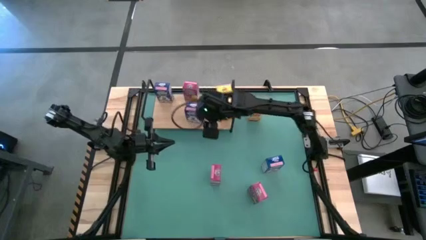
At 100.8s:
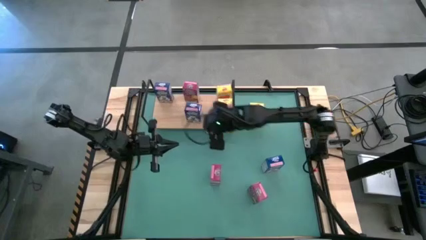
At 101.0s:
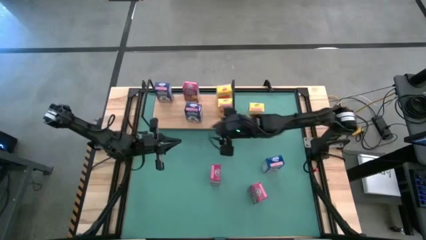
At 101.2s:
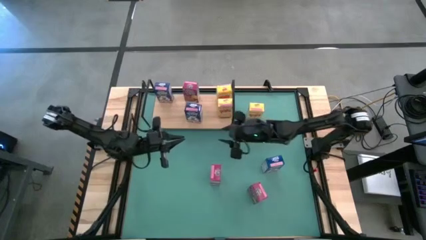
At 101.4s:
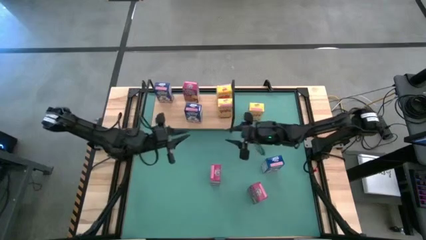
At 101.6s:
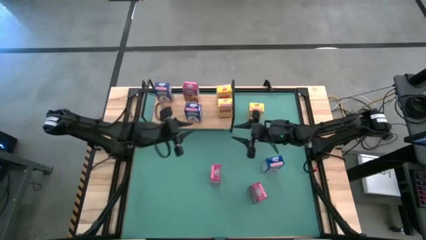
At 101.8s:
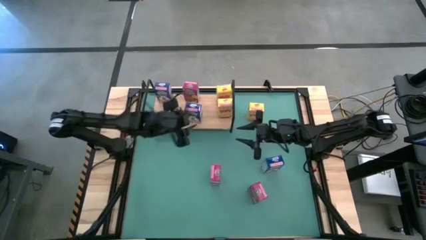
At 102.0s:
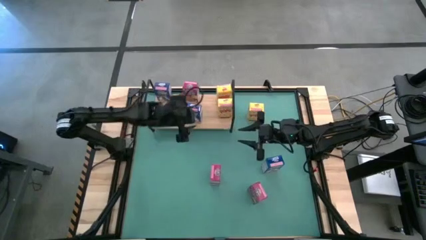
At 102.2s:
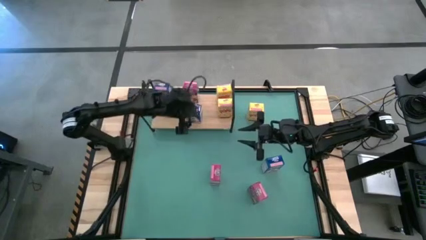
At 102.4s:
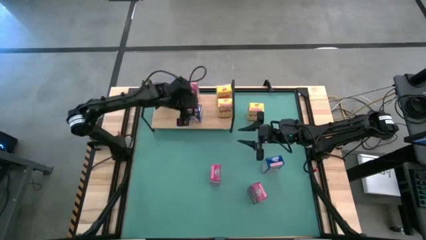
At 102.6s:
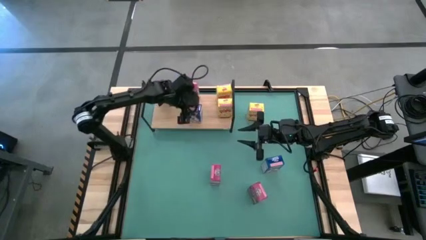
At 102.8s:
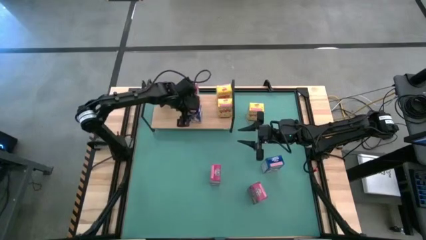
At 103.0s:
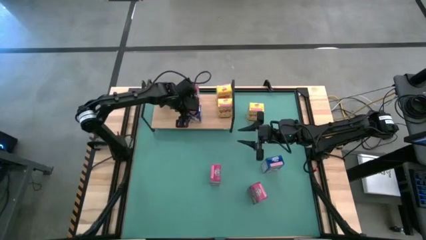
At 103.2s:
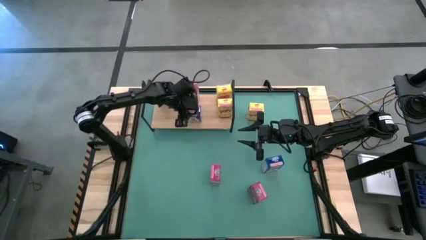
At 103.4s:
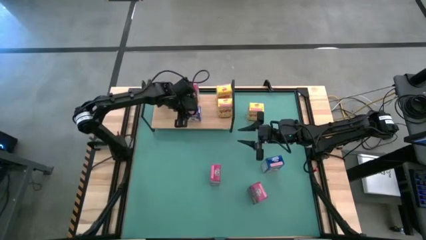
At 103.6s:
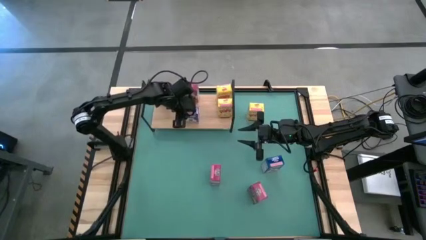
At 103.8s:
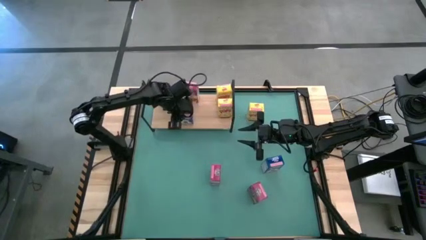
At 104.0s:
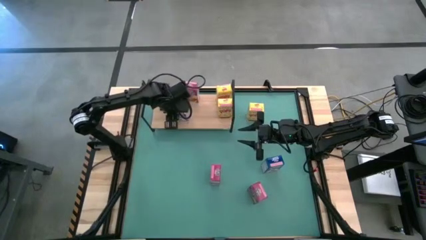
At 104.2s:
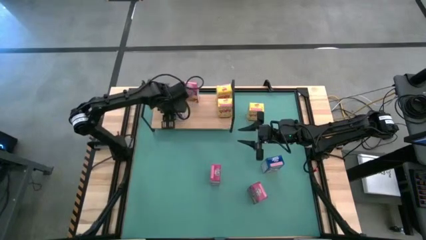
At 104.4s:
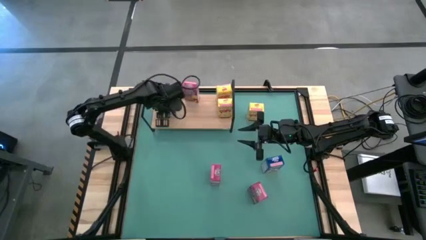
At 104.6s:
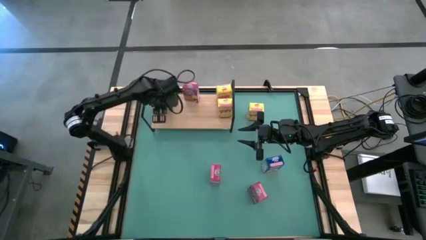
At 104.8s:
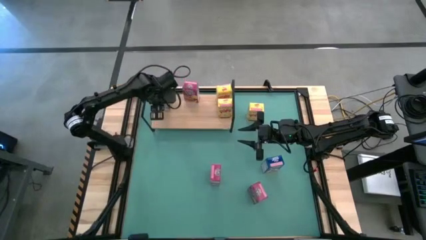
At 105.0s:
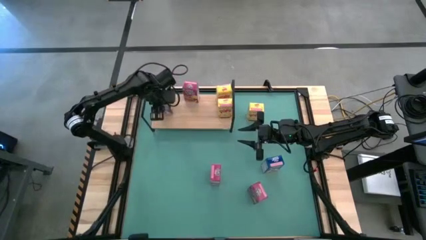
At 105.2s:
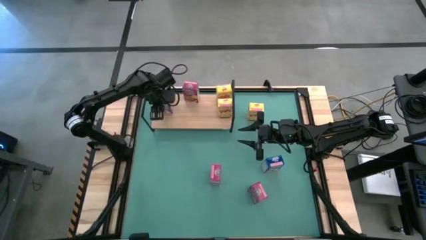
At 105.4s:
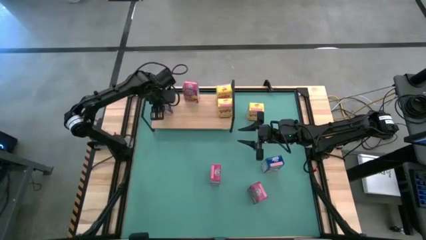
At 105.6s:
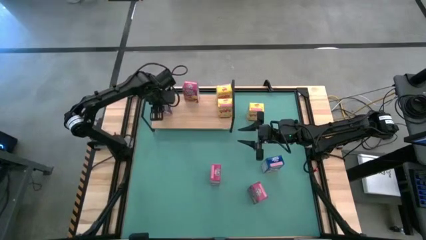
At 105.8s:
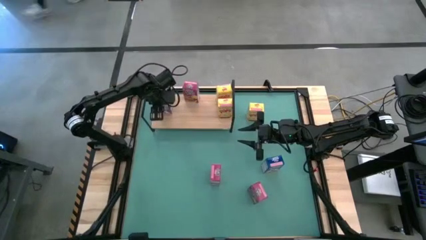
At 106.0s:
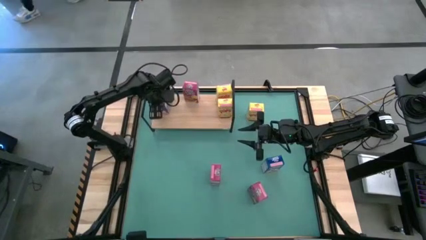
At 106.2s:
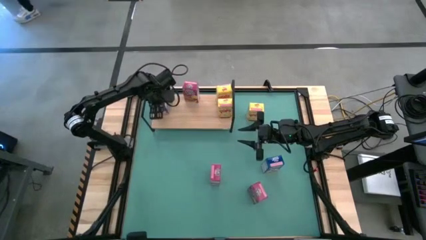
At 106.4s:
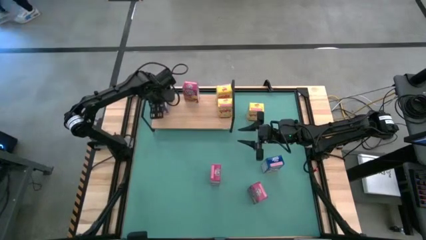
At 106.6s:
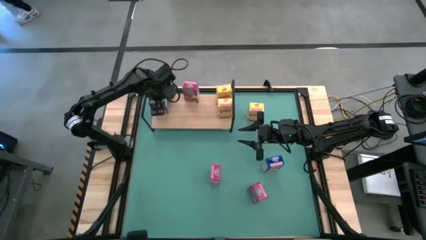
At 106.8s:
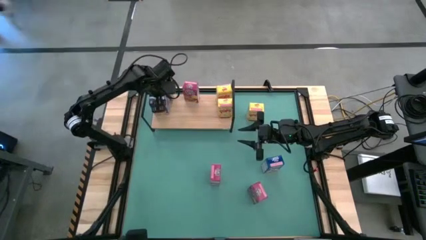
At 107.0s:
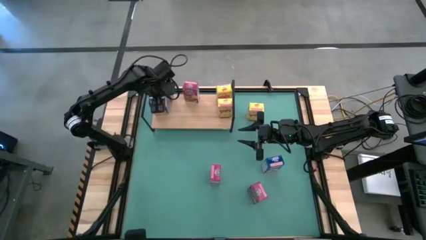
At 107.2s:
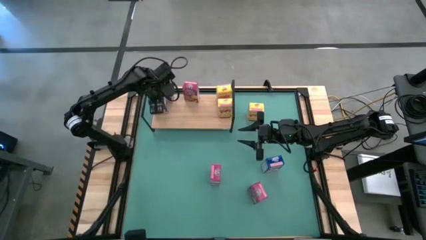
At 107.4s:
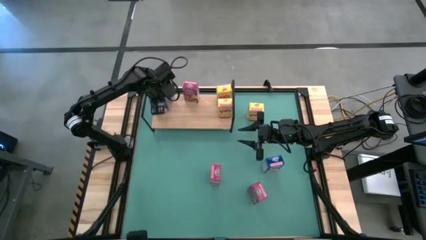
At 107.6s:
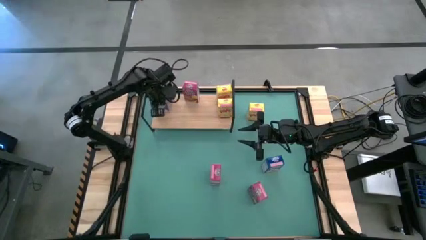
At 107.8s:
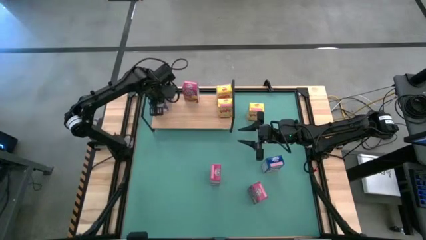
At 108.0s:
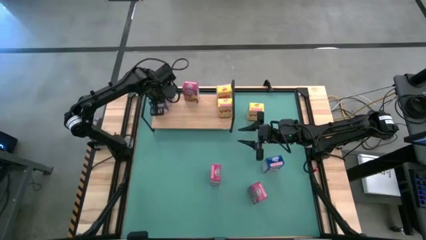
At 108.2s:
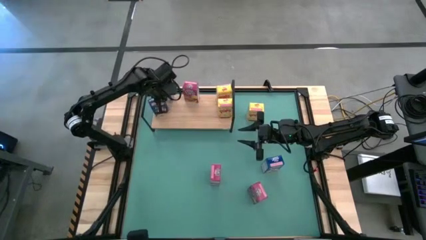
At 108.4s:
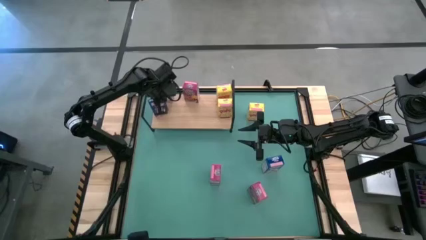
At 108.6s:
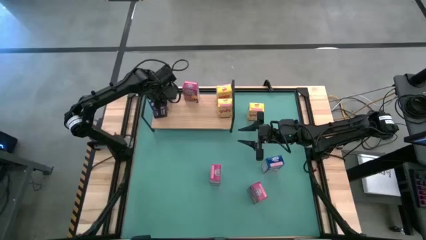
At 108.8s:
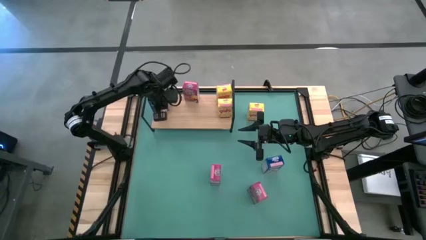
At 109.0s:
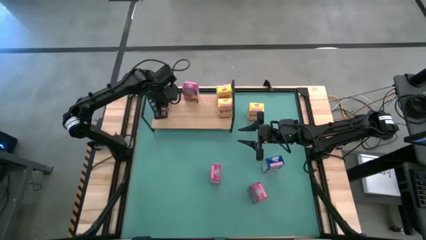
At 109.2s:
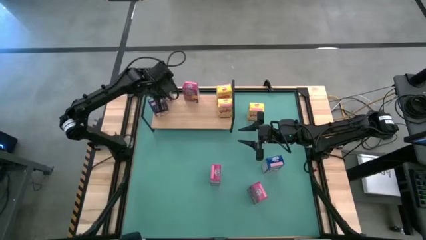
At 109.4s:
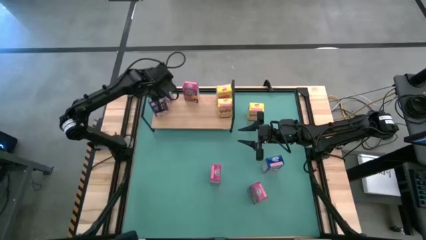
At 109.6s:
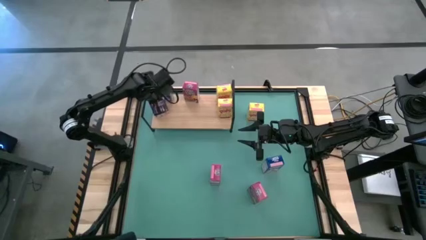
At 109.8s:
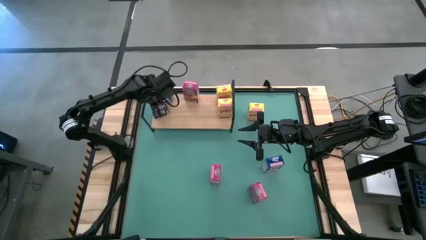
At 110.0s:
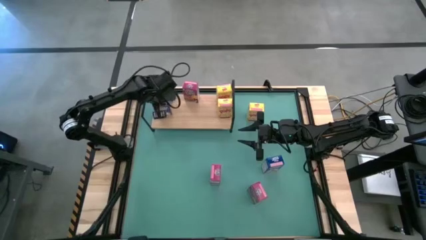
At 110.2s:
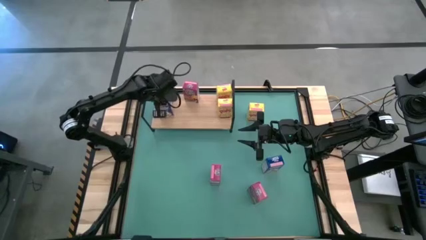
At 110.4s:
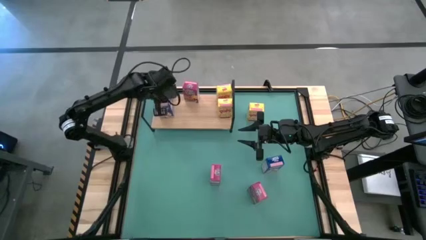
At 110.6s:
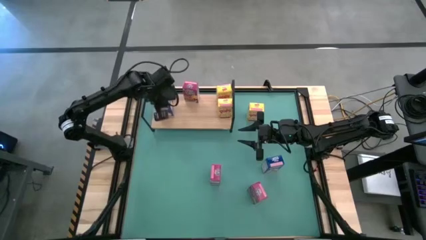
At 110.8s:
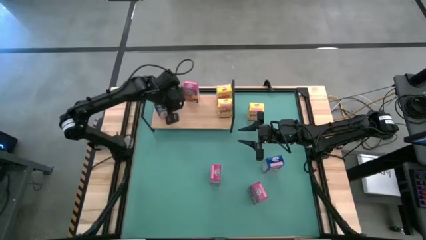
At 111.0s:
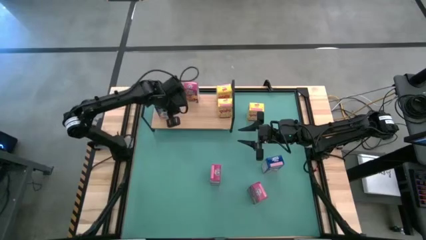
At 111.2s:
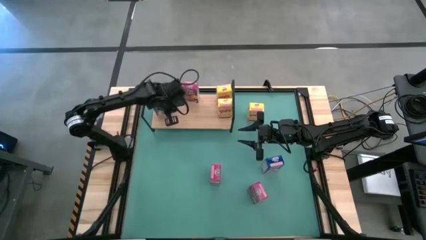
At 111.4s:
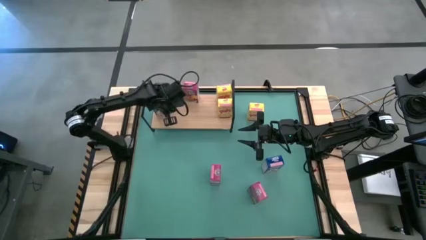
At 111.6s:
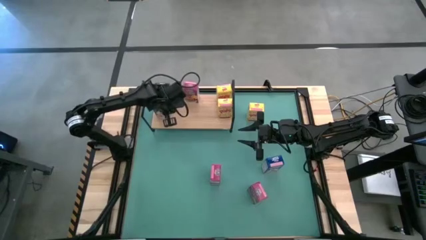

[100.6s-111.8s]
Task: Stack cereal on shelf
Put the top blue cereal box on the shelf

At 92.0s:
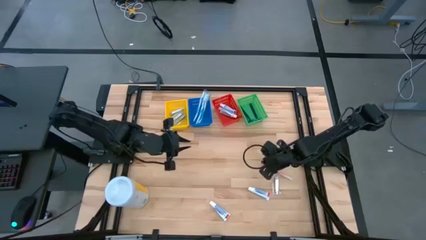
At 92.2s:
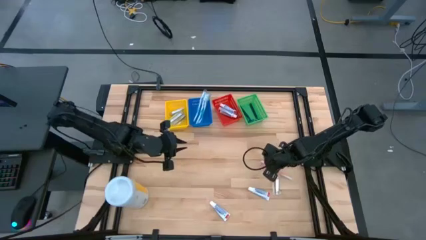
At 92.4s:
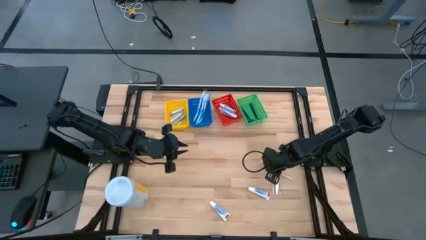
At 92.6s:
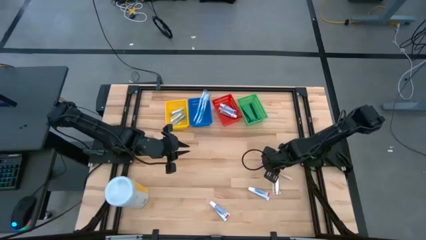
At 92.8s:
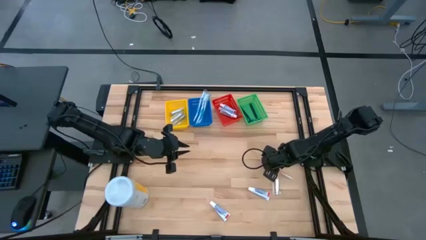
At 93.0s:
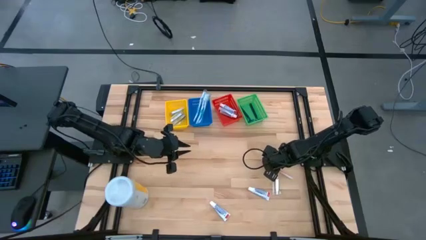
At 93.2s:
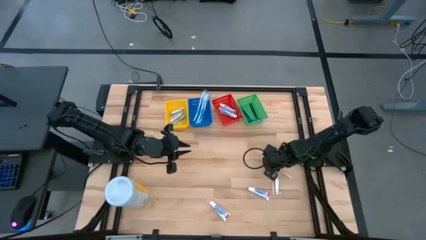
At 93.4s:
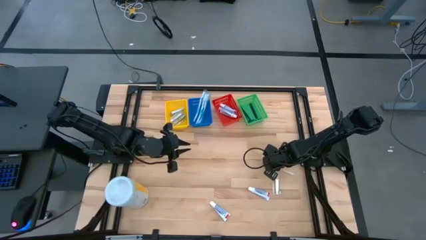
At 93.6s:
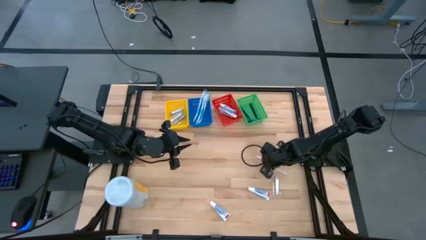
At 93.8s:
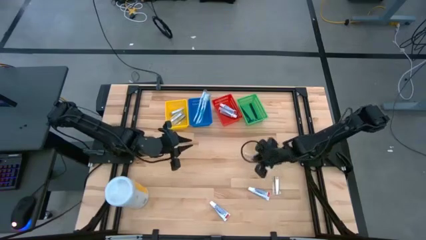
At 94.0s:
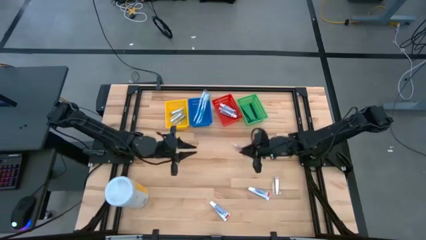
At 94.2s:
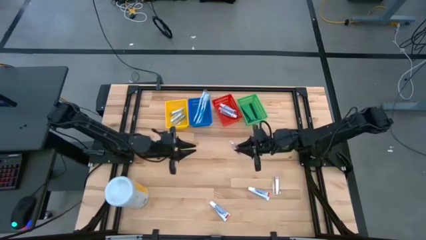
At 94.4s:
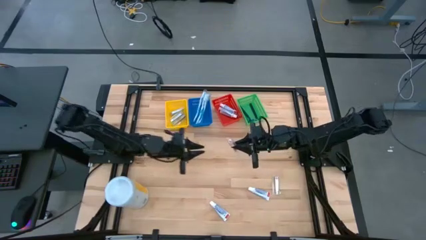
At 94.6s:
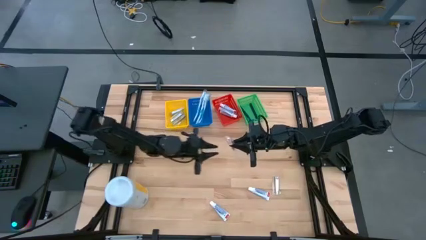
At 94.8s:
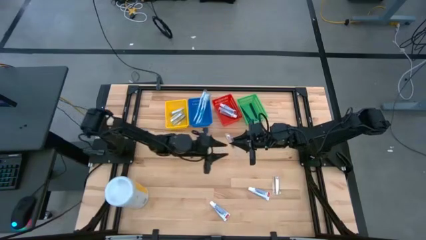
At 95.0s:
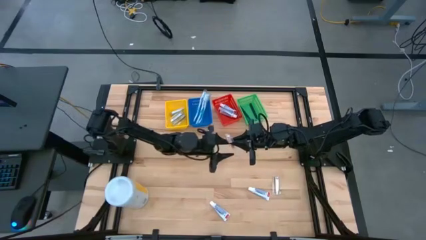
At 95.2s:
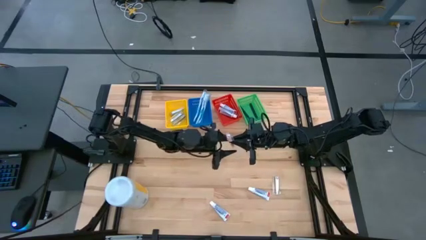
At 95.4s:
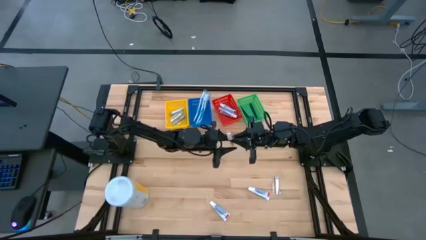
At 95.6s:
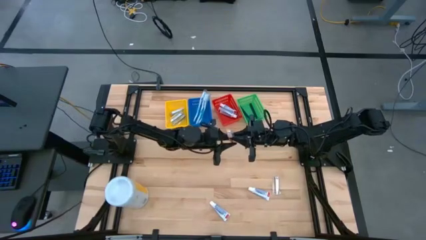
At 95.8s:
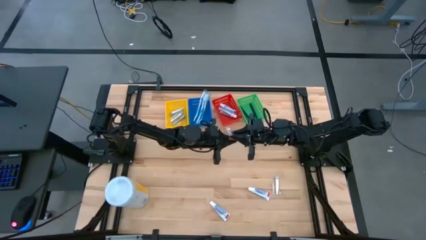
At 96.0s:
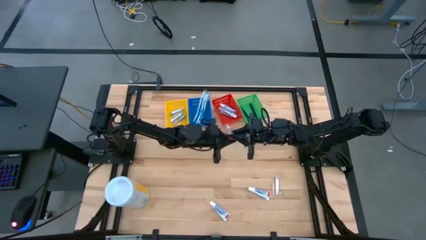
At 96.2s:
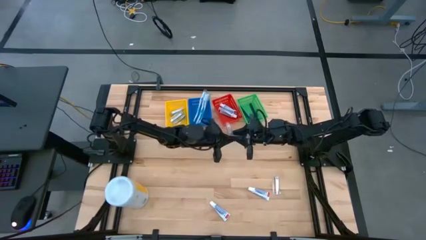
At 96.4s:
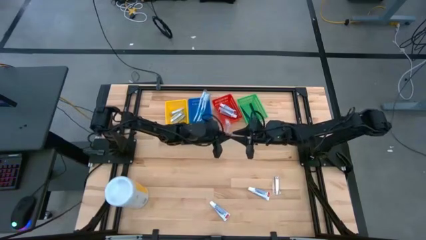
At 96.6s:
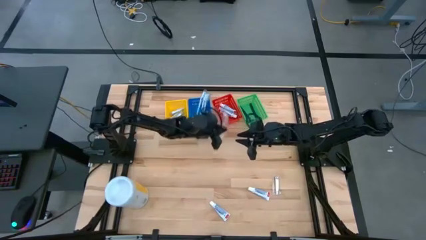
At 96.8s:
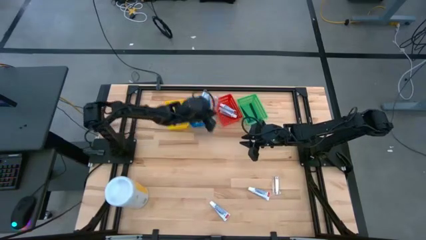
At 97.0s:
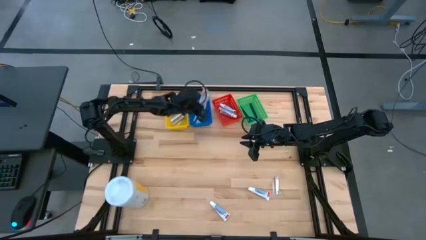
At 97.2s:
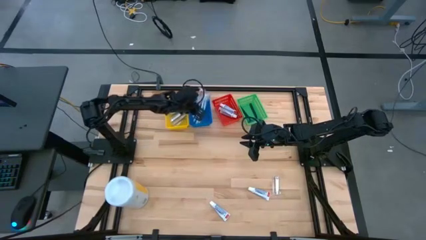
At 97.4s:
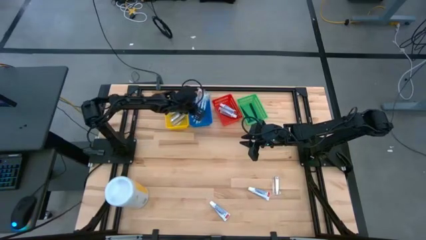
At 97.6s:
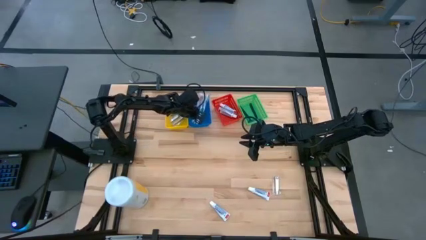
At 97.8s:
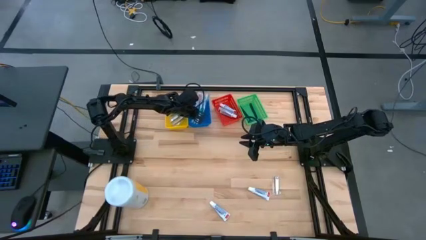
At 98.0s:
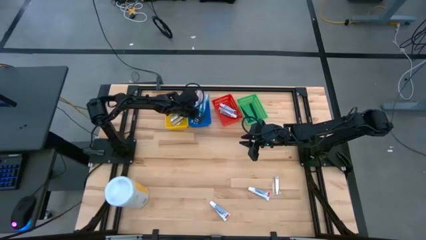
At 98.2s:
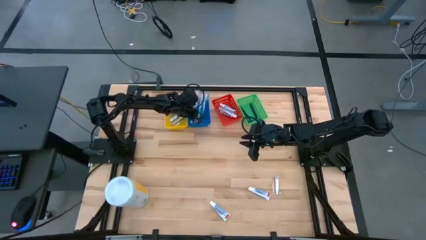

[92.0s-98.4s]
Task: Pick & Place Travel size toiletries
Put the orange toothbrush into the blue bin
